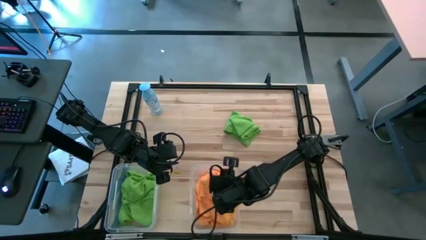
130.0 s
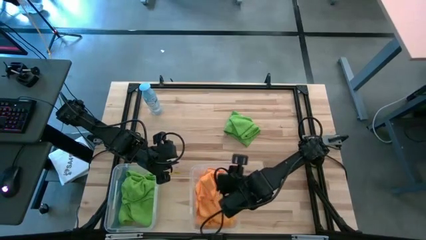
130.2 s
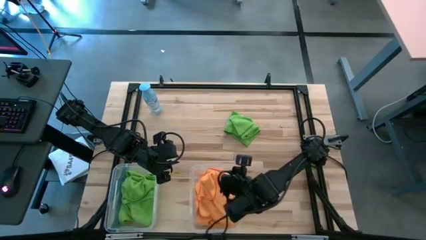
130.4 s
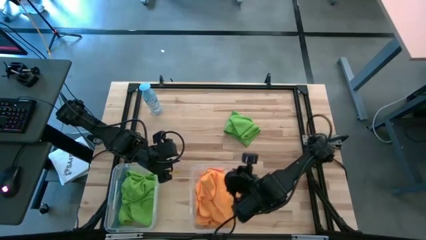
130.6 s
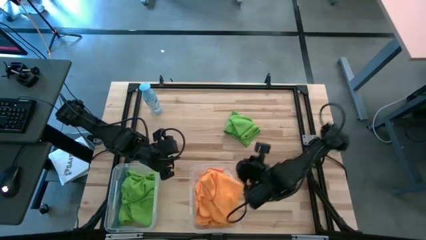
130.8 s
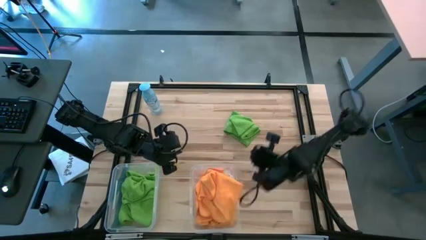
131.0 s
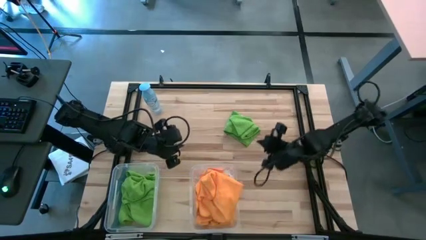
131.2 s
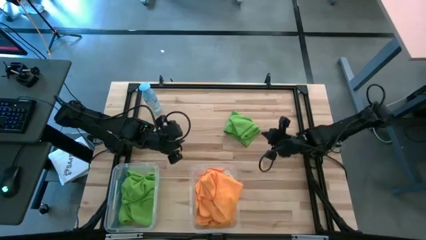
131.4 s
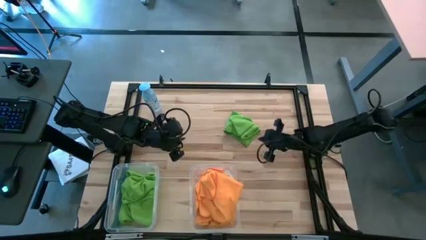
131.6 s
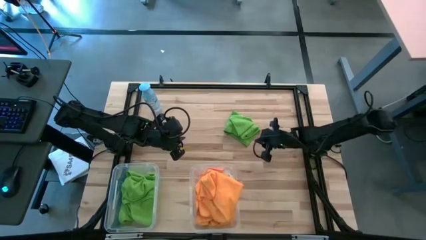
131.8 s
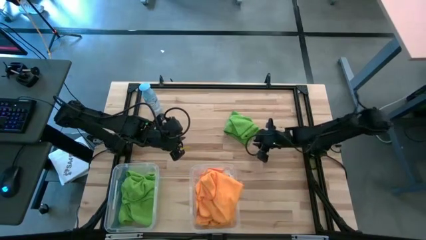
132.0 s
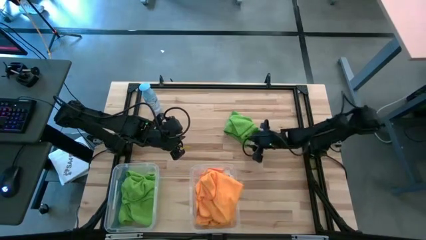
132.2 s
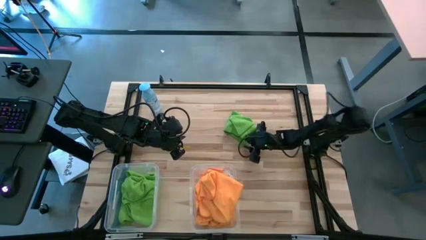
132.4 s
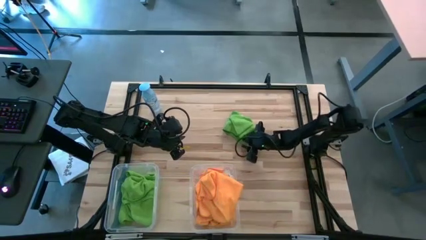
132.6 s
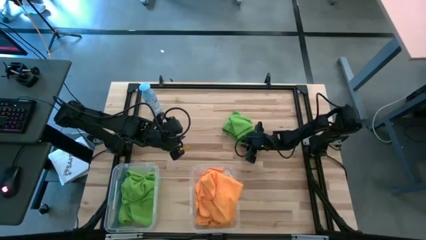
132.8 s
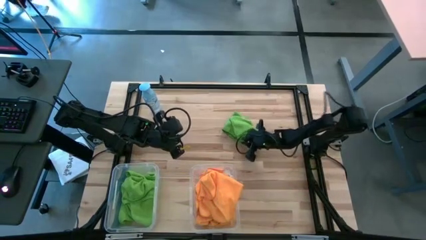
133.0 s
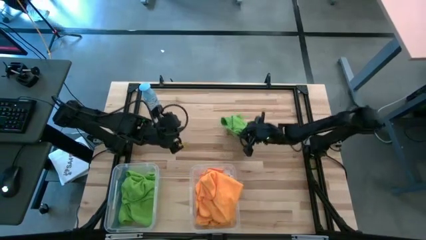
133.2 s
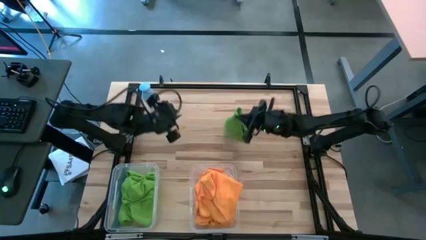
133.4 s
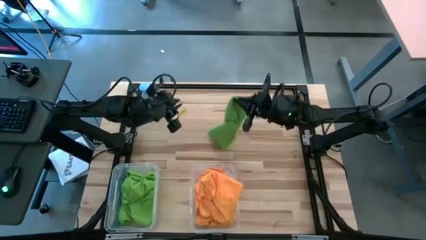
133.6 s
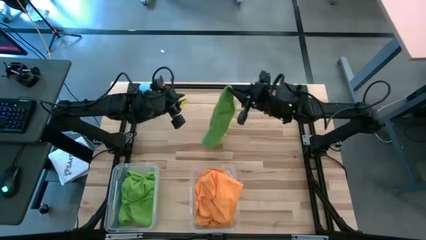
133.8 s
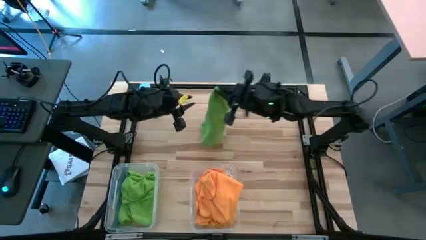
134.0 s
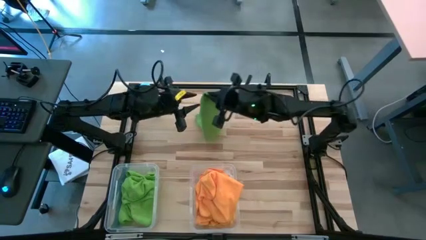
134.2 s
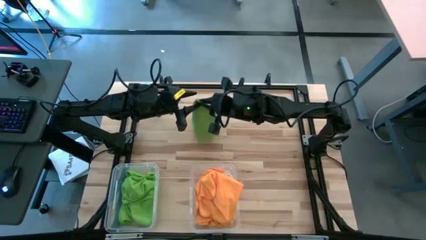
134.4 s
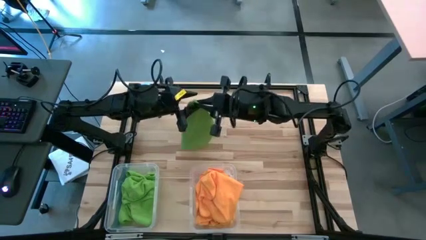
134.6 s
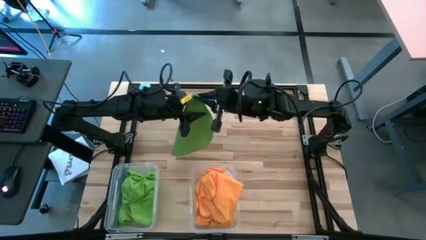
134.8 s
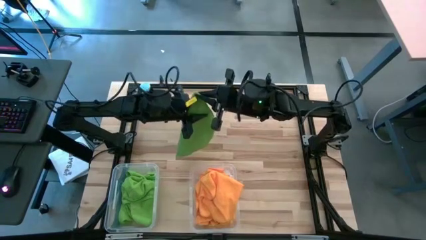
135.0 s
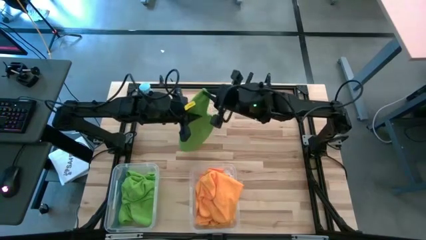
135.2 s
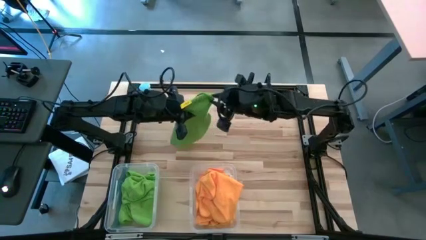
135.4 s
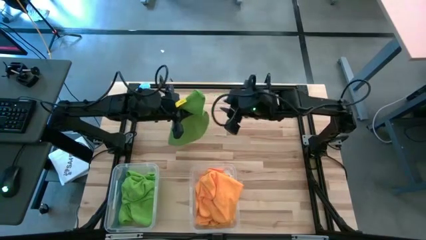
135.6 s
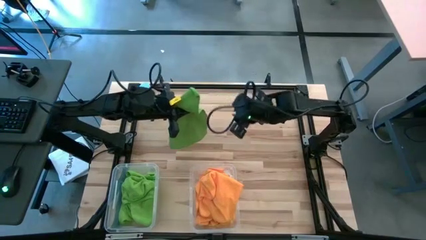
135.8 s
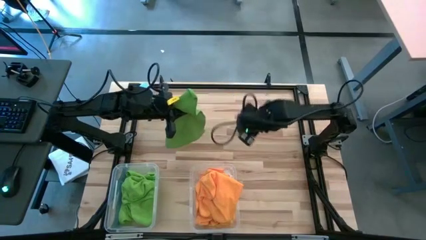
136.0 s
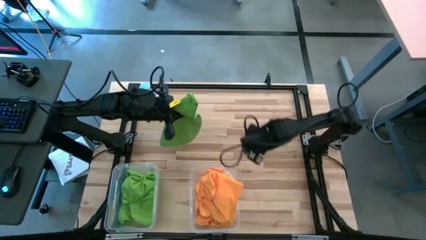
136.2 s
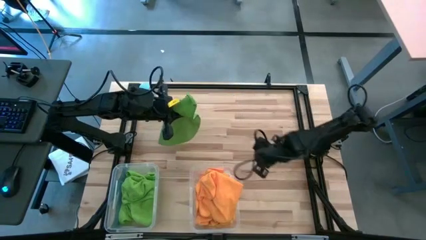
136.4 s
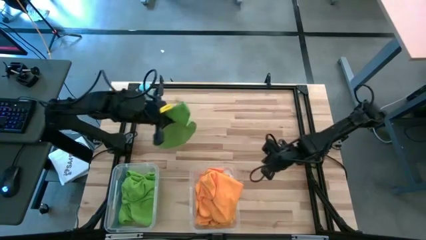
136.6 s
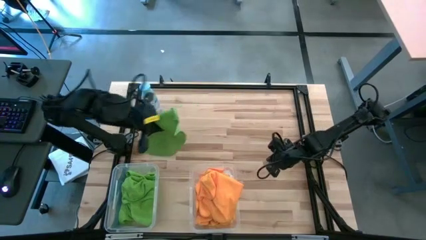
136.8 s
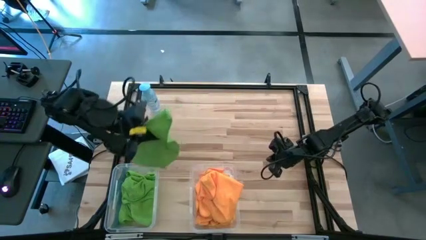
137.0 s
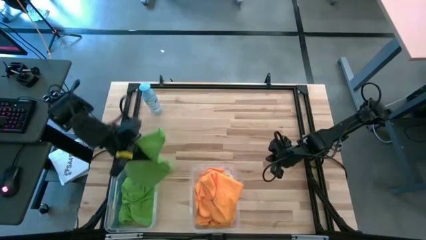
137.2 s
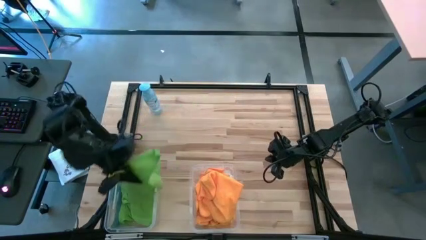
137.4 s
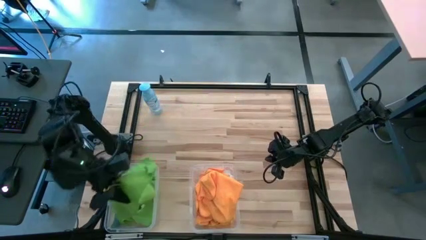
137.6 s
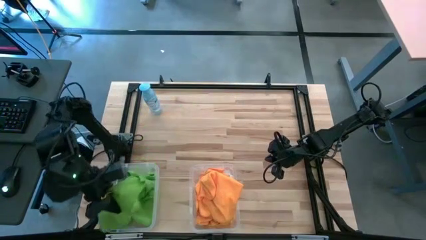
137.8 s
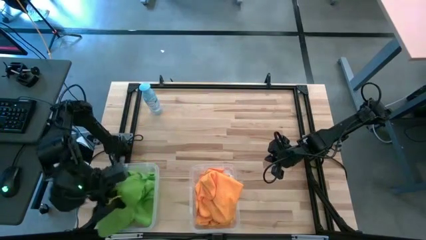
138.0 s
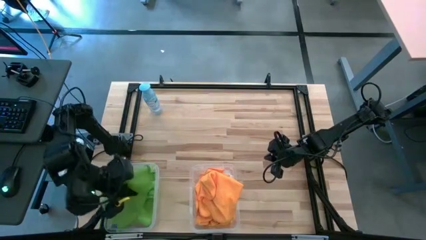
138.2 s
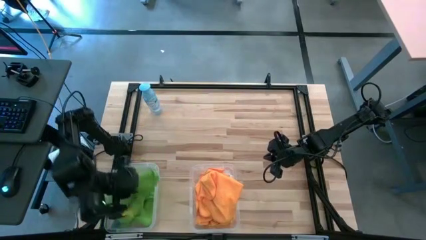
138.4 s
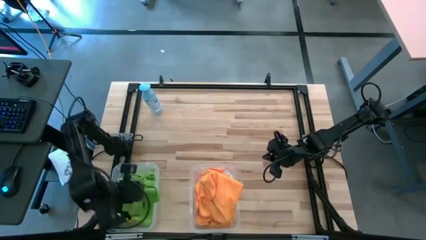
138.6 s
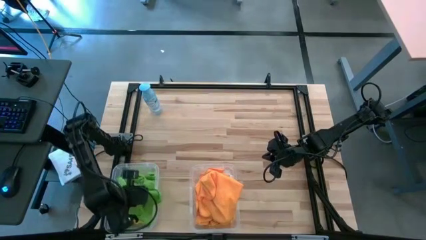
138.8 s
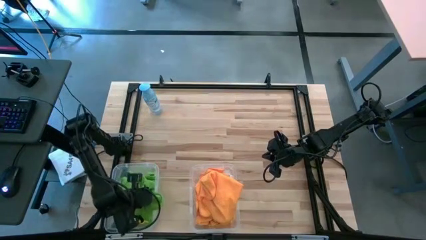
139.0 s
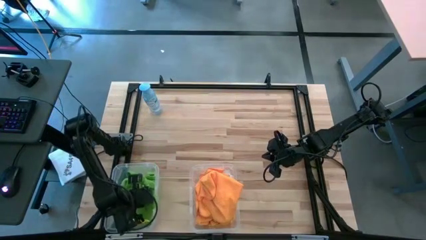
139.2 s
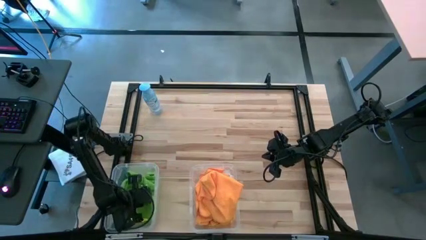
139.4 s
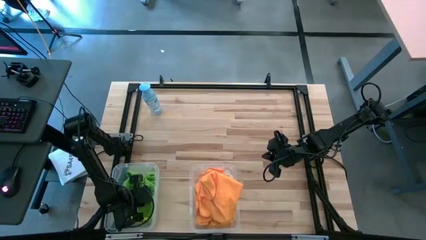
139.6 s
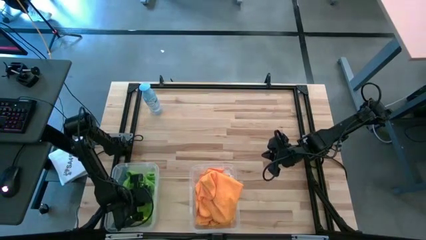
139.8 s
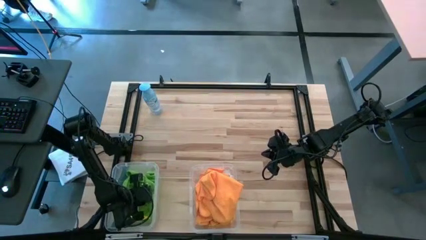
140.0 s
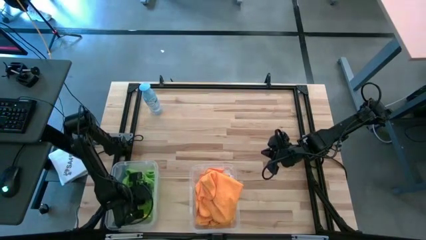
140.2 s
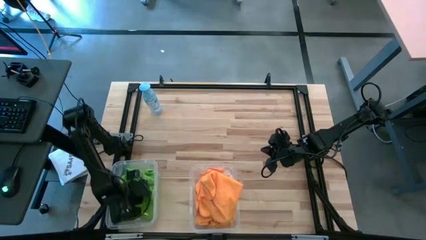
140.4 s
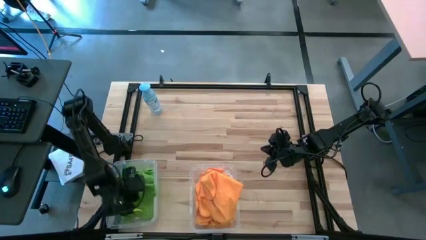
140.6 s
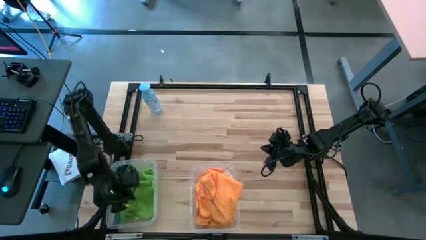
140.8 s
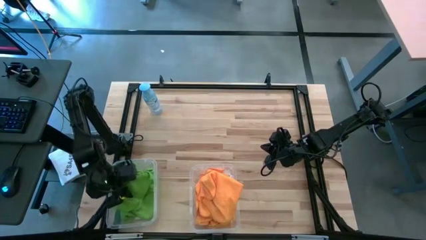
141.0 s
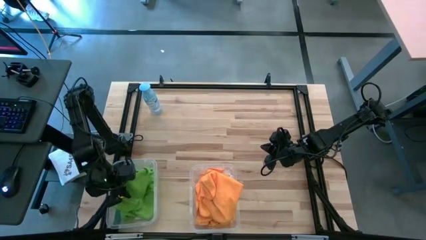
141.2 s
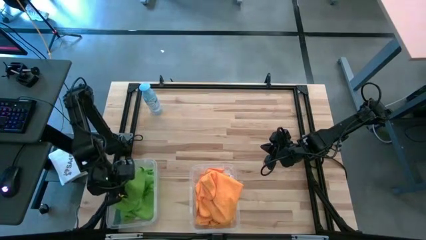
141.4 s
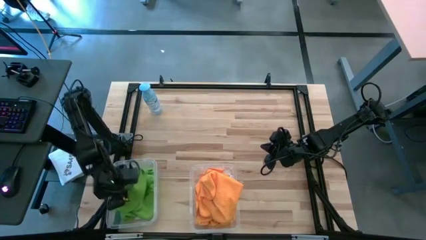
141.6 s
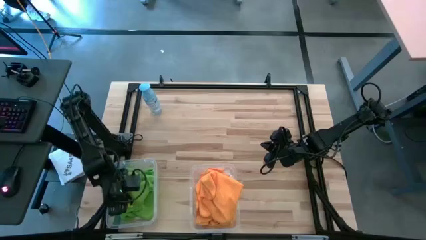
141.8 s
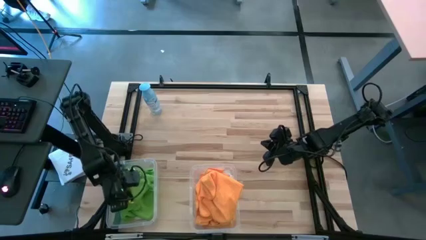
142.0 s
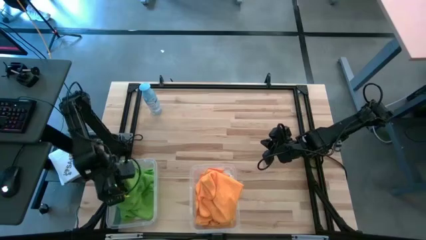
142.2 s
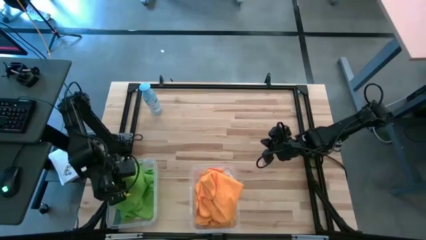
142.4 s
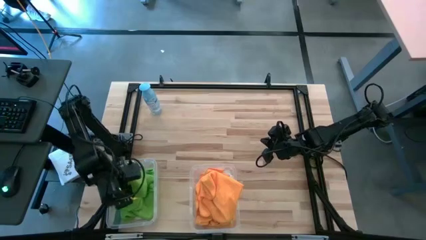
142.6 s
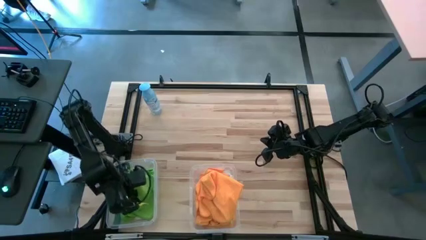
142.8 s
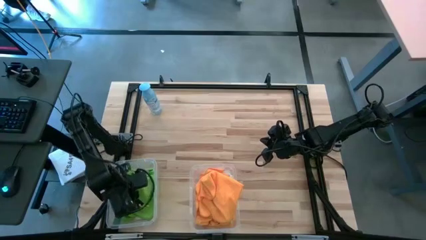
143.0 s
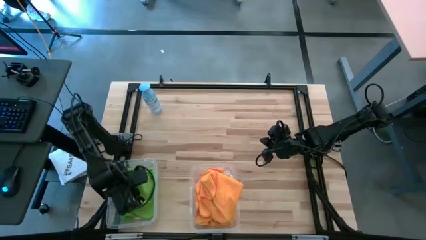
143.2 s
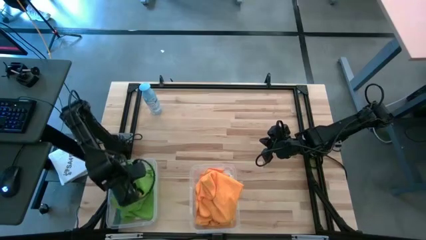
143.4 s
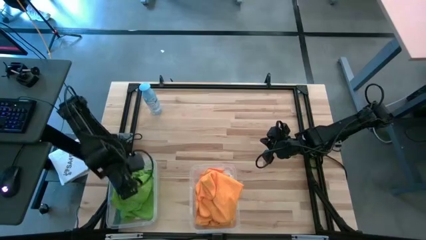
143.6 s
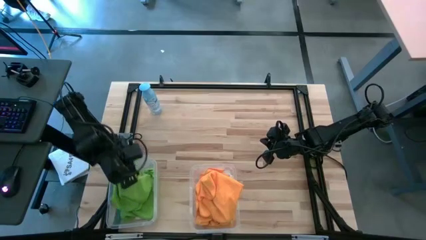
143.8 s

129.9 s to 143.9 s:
Task: Sort microfiber towel by color & place in baskets
Put the green towel into the left transparent bin

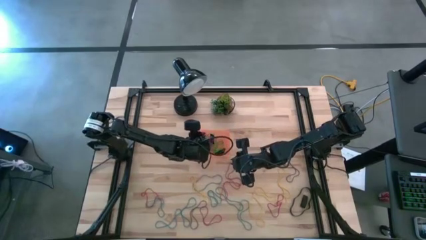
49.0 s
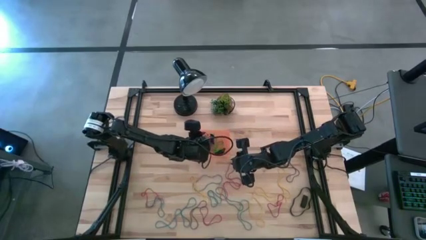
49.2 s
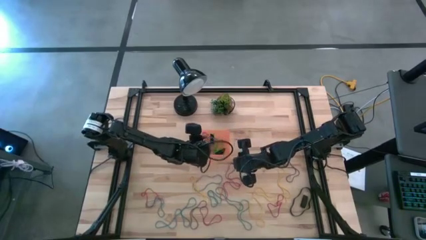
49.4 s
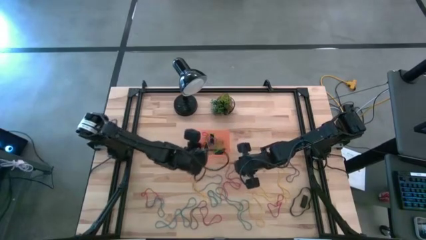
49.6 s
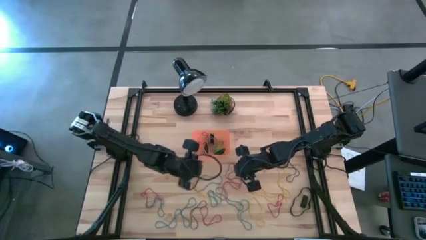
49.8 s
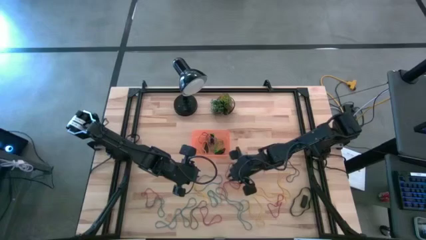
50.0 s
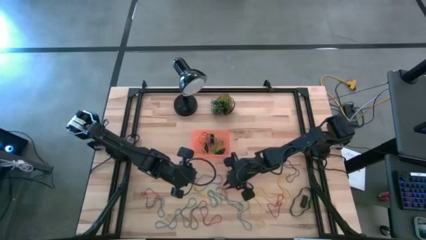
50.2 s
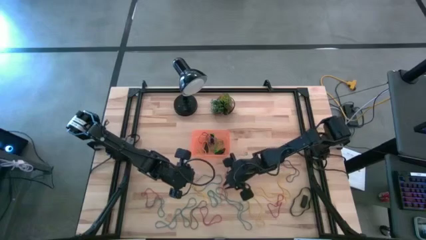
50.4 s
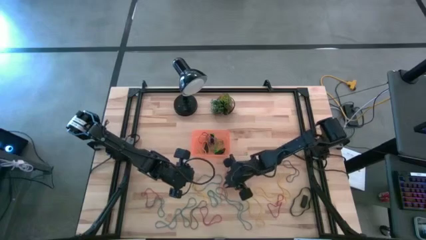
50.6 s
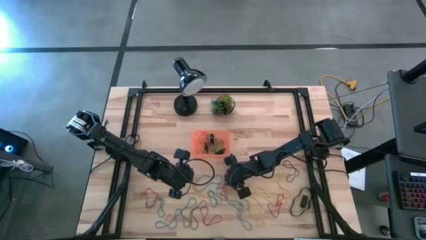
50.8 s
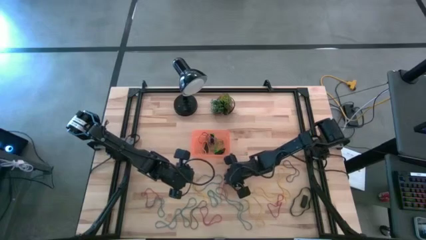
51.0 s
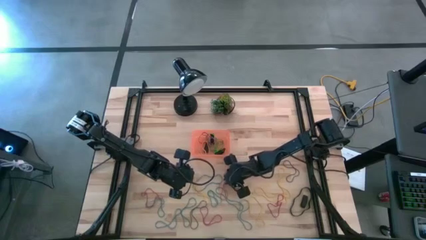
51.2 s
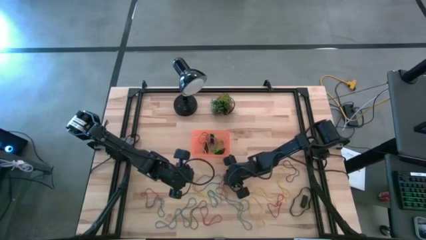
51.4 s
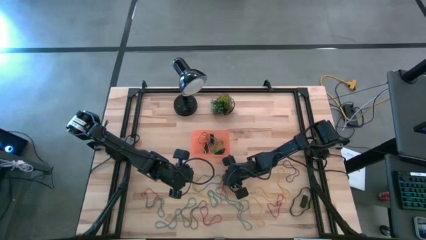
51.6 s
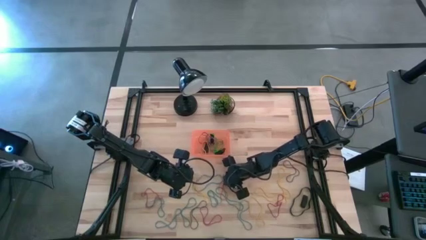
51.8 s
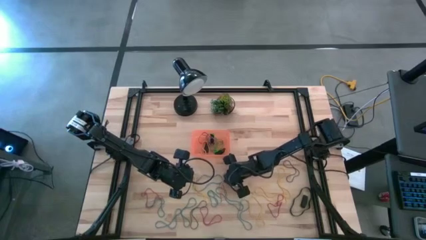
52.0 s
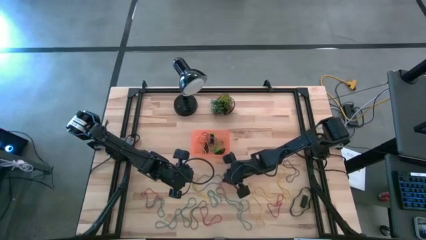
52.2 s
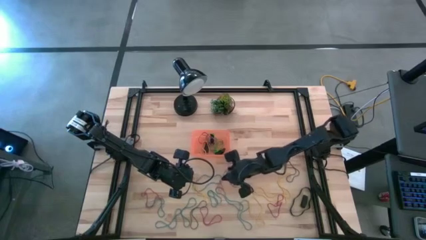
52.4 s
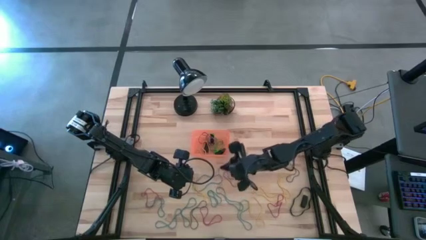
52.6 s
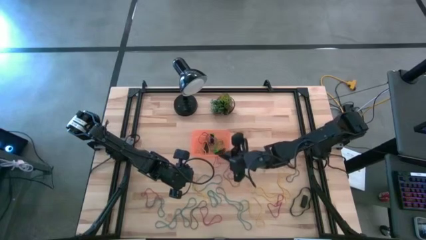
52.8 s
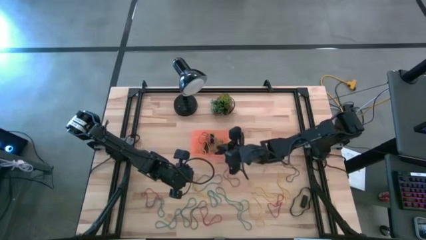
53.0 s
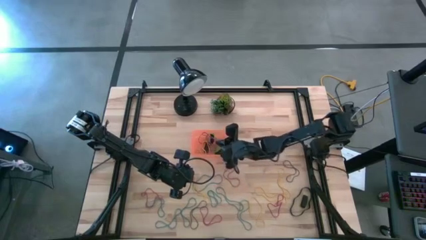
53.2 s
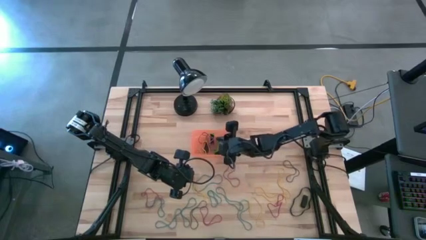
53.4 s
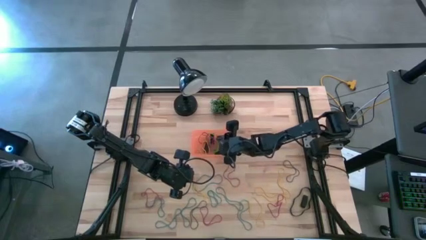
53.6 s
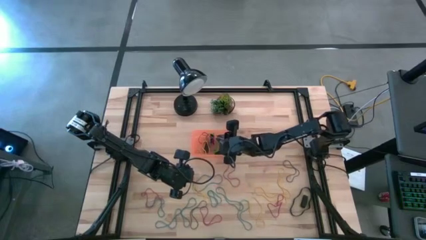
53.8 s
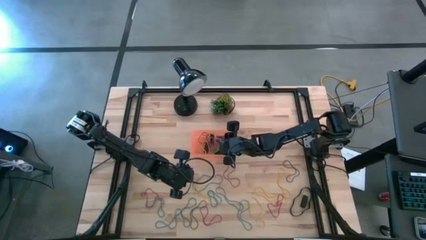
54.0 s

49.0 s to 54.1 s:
Task: Pick and place rubber bands into bin
Put the red rubberband into the orange bin
